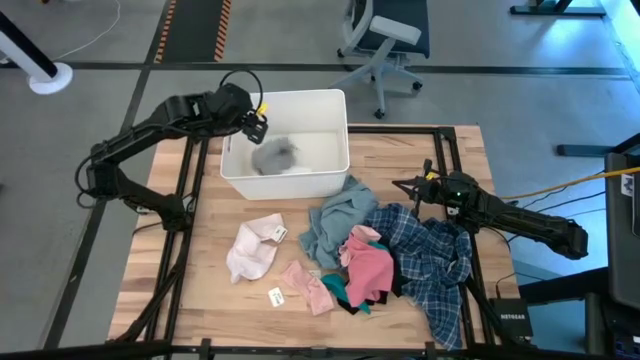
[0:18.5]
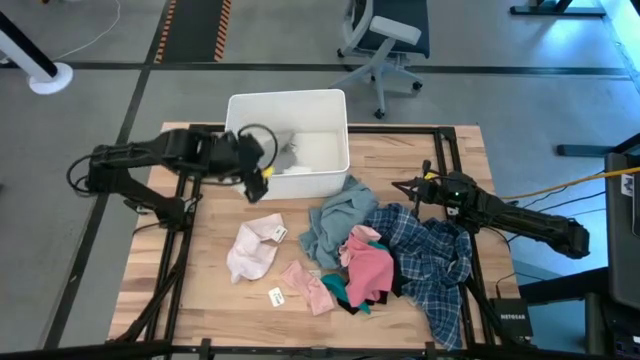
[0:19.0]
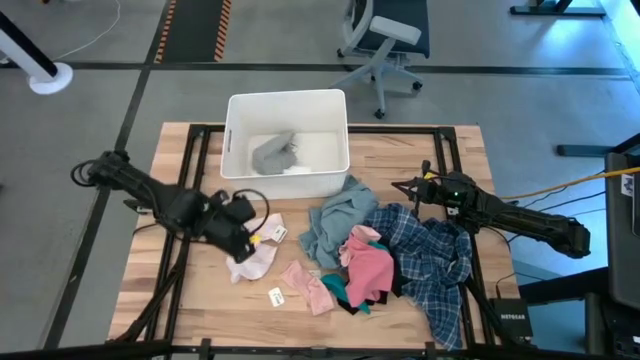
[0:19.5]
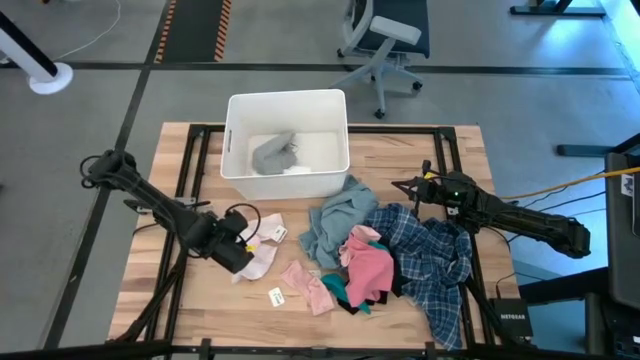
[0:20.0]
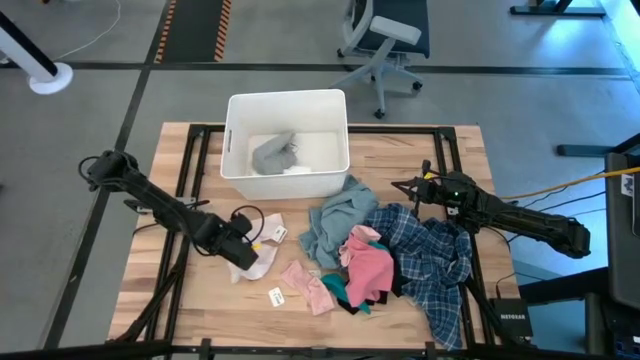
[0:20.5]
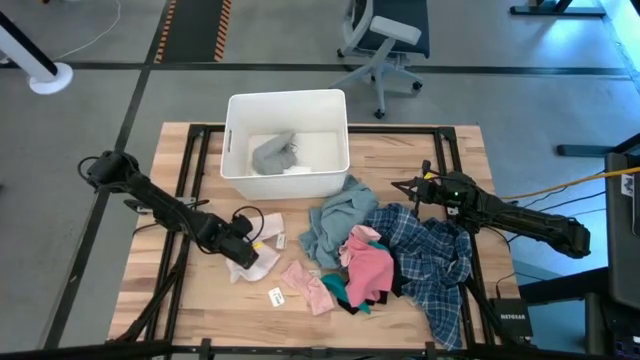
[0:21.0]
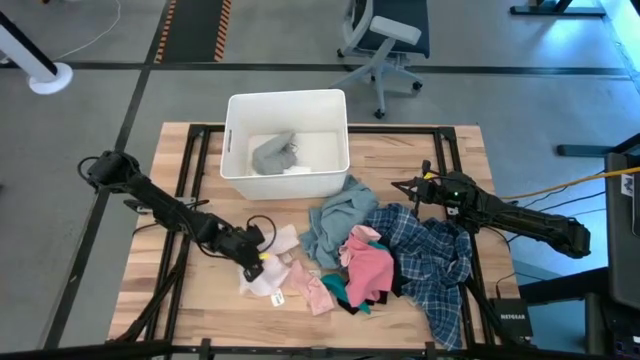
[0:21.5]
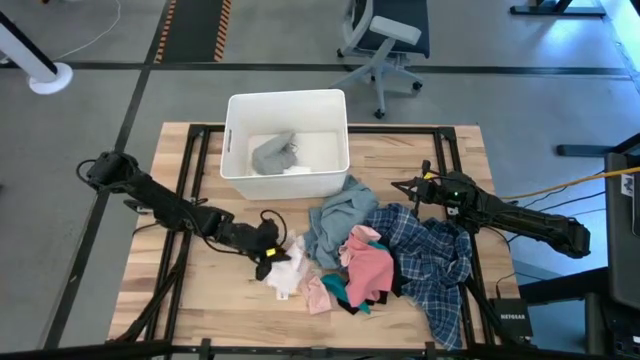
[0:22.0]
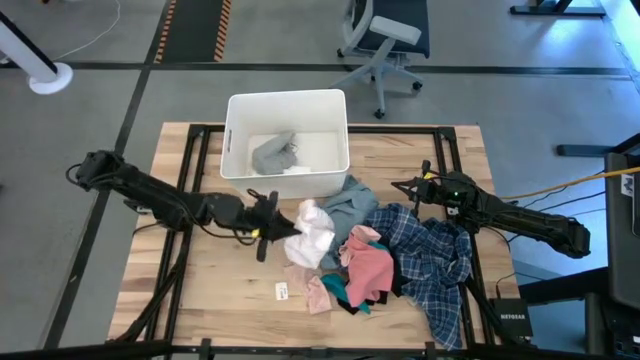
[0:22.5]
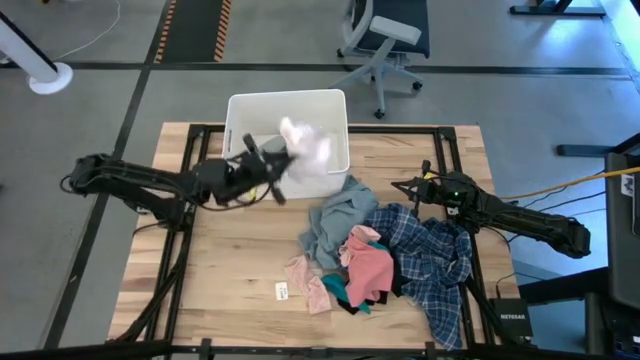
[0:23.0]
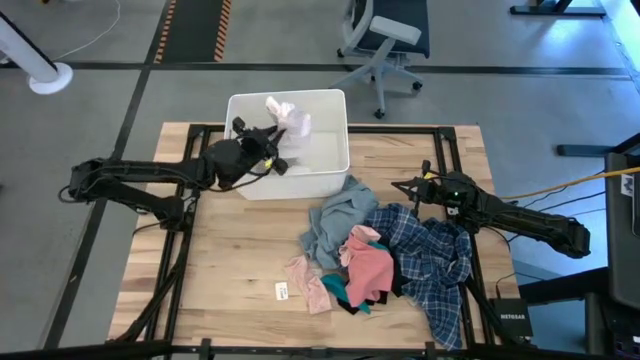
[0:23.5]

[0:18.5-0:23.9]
Task: Sort clothes
Put the light pink underwear into the white bin

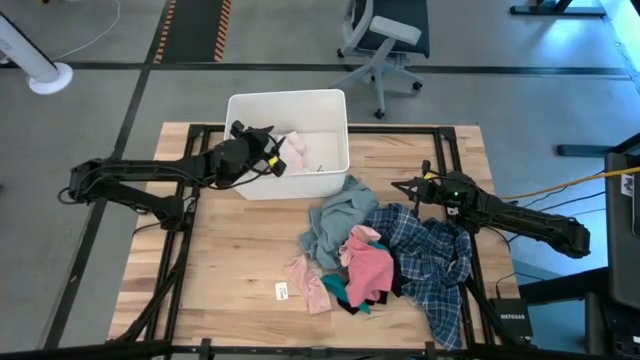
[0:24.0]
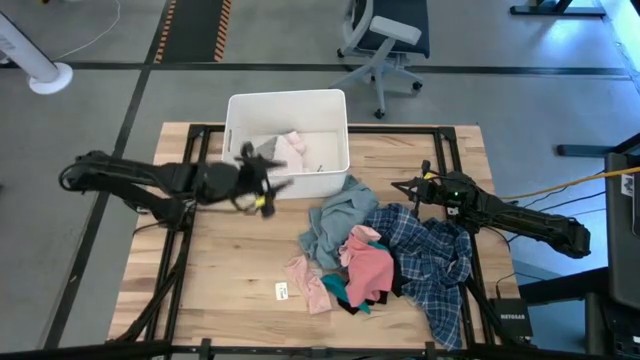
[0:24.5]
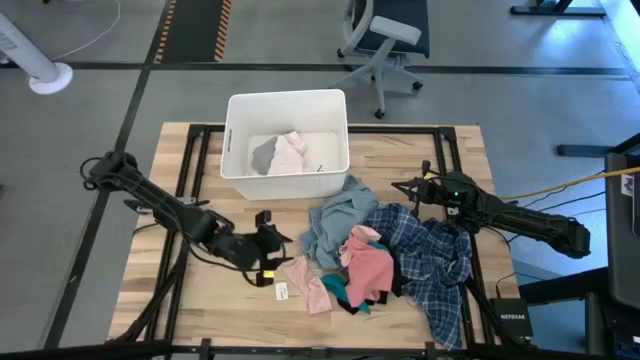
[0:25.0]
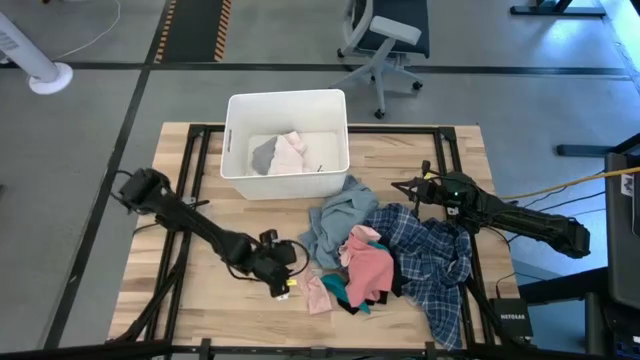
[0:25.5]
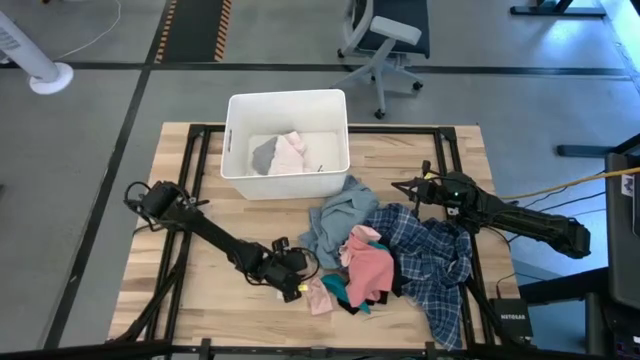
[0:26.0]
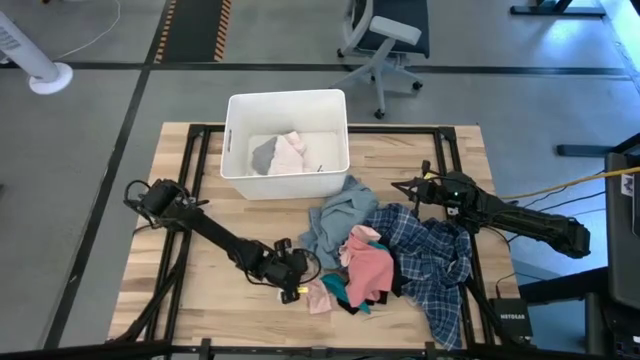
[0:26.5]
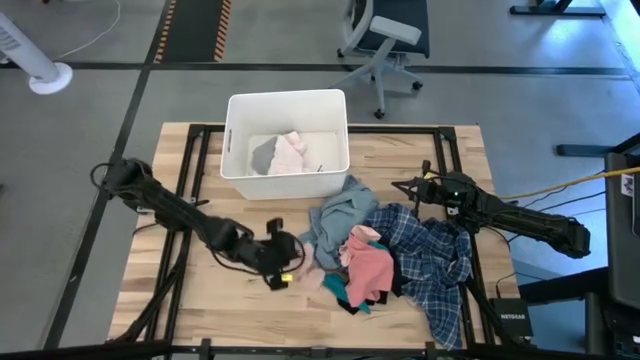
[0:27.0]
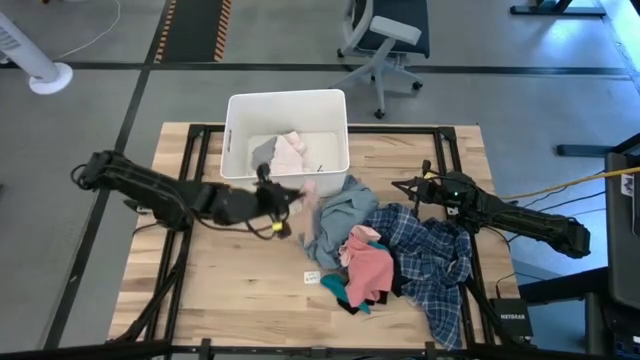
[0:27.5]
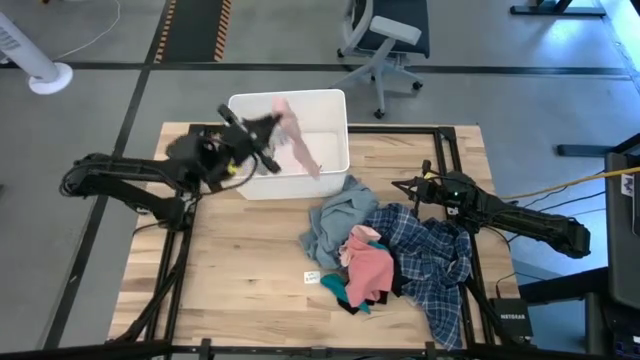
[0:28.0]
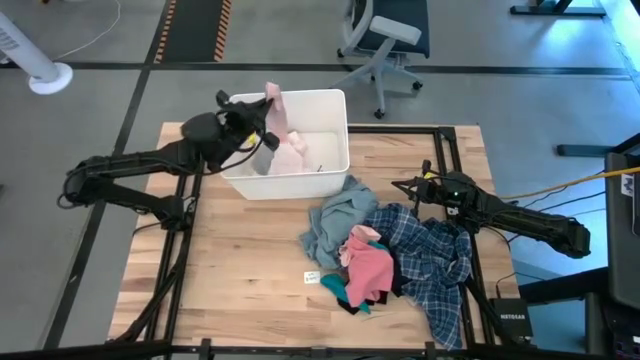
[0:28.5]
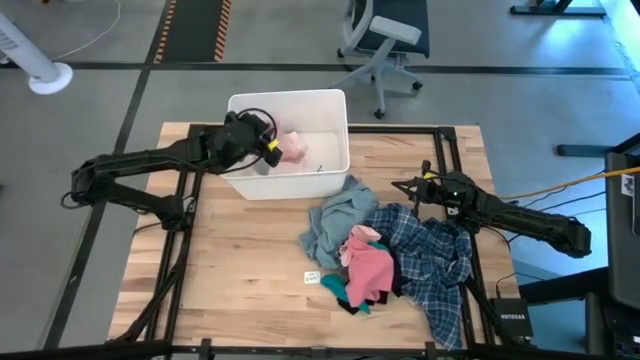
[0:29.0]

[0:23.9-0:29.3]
Put the left pink sock into the white bin

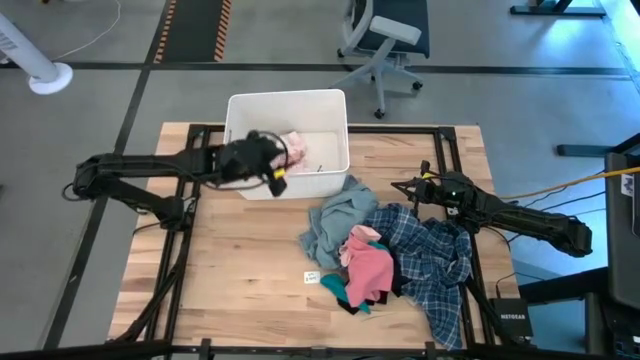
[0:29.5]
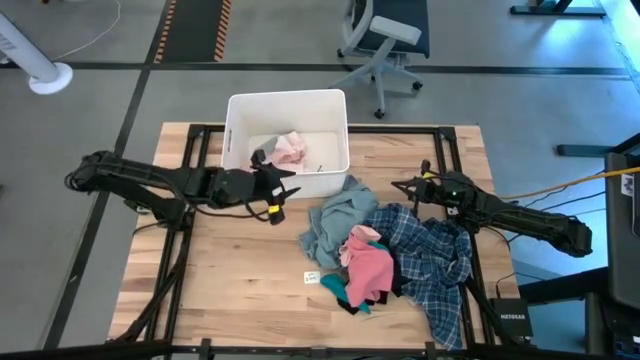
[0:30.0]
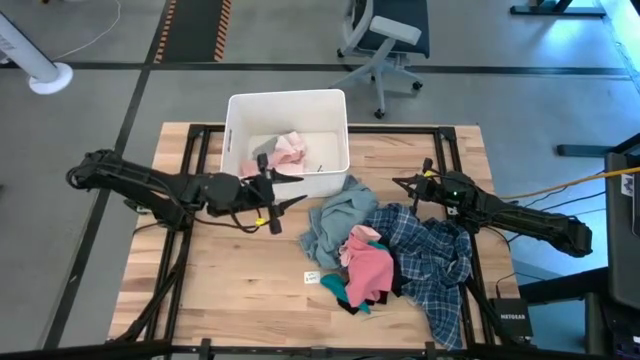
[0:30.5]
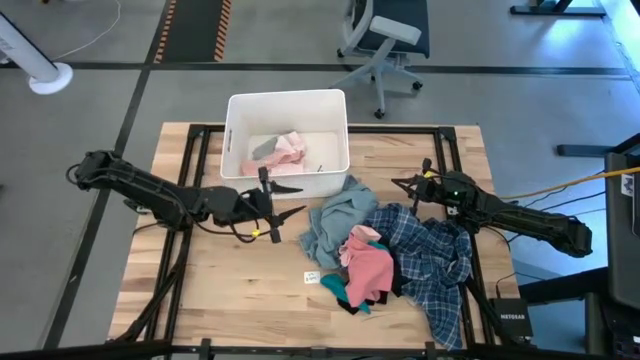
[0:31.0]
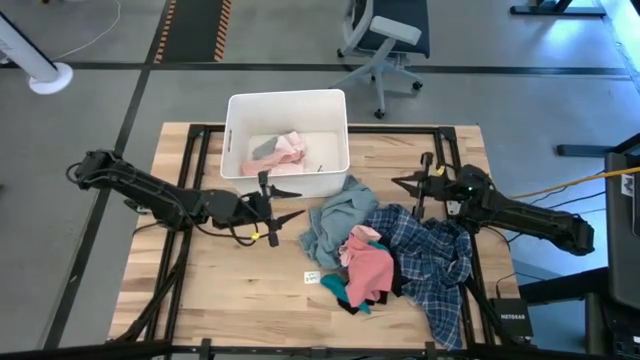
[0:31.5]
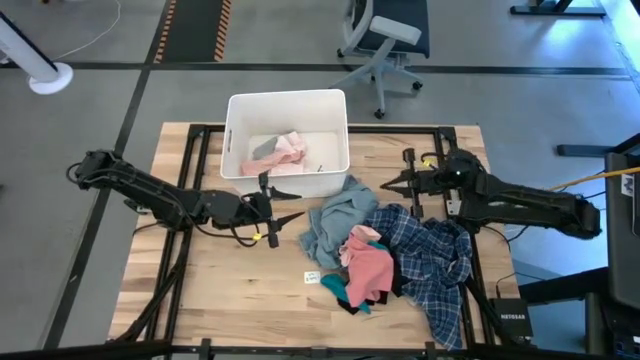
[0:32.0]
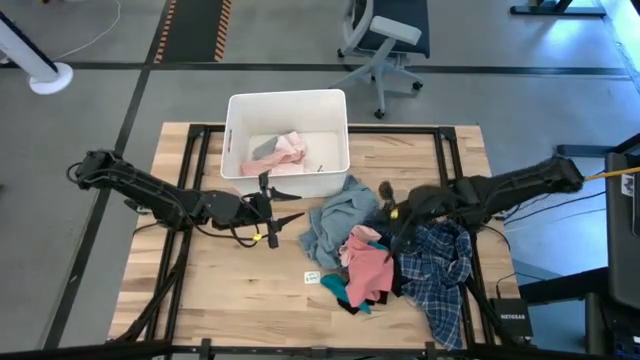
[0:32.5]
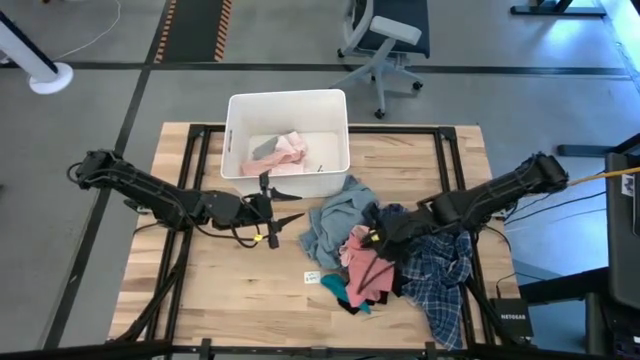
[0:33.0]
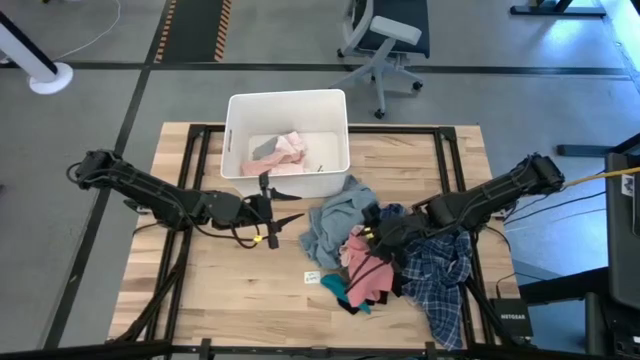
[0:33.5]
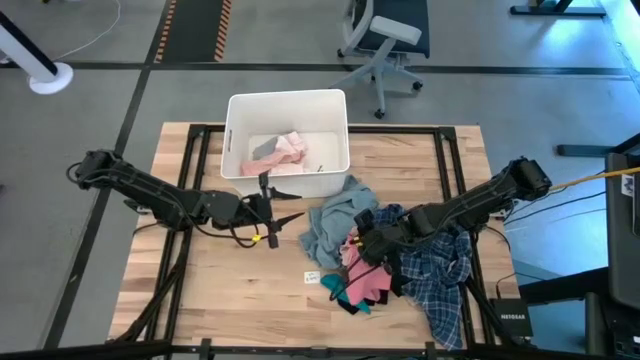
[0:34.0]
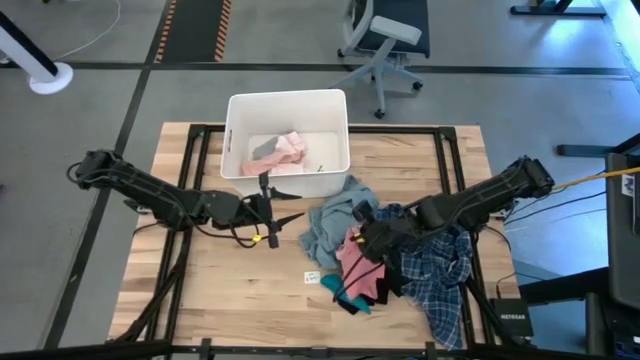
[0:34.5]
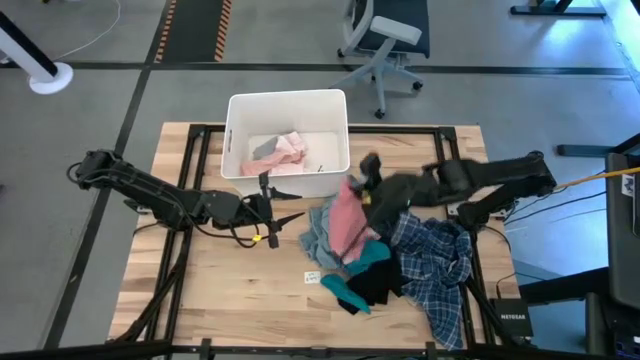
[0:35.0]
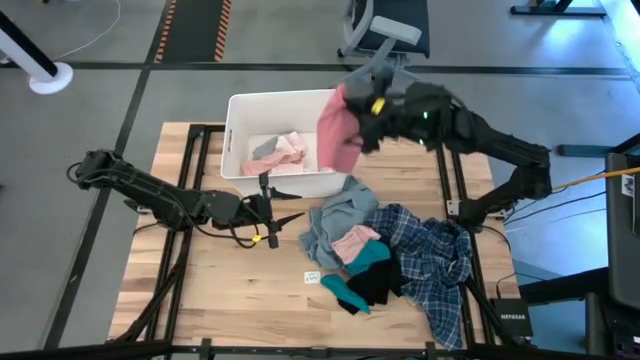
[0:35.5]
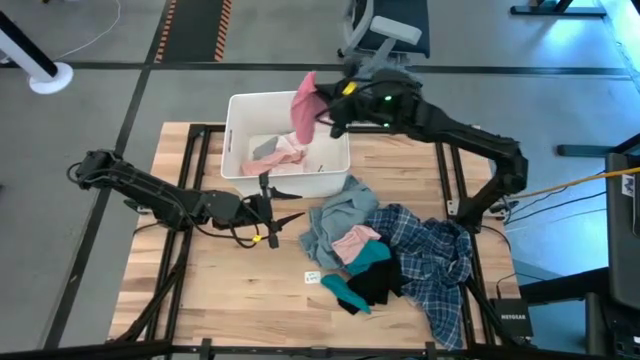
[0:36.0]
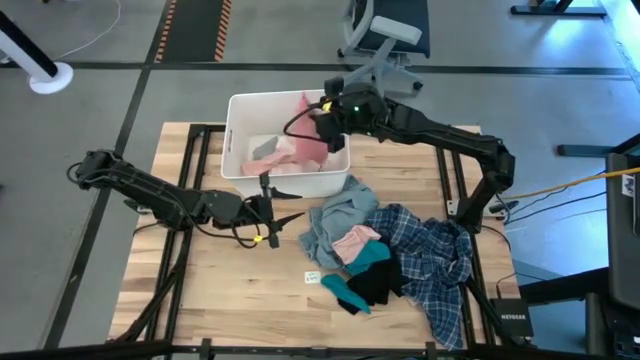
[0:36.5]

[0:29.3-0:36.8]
Put the pink underwear into the white bin

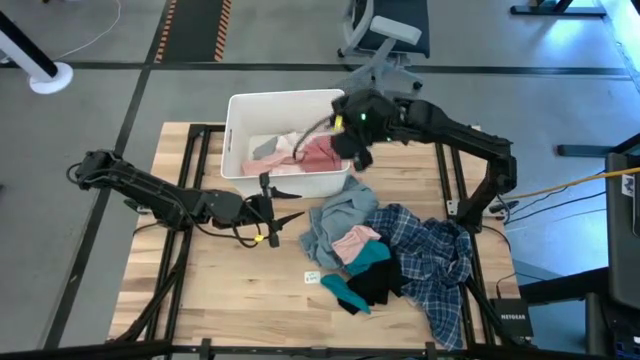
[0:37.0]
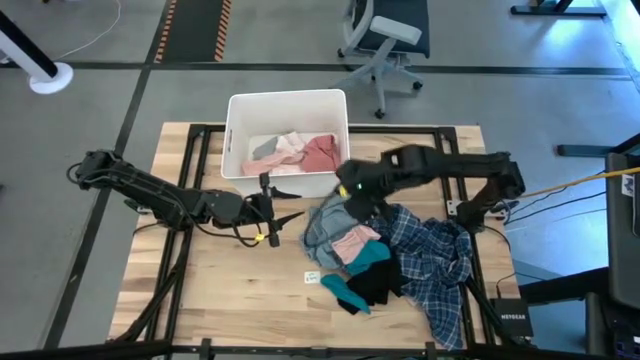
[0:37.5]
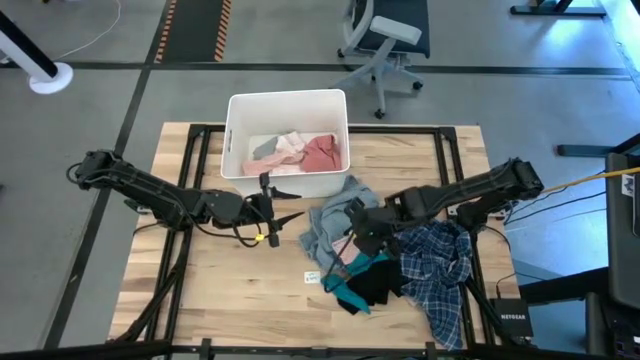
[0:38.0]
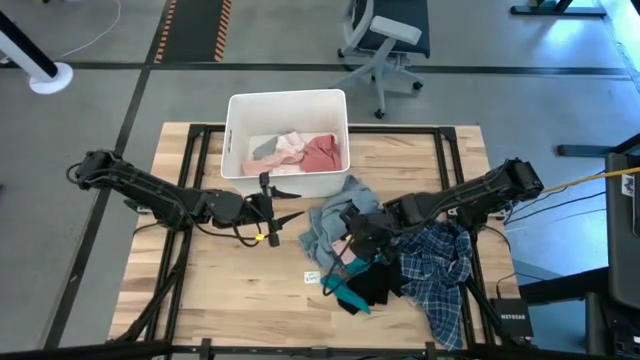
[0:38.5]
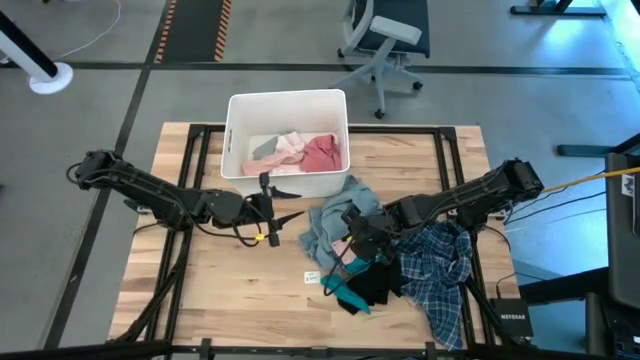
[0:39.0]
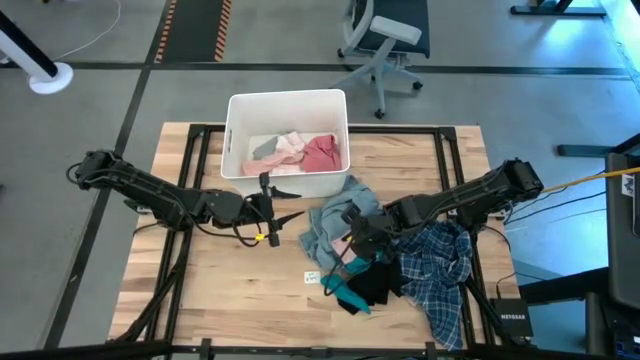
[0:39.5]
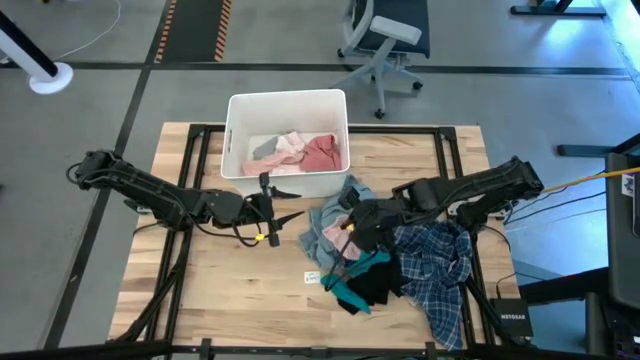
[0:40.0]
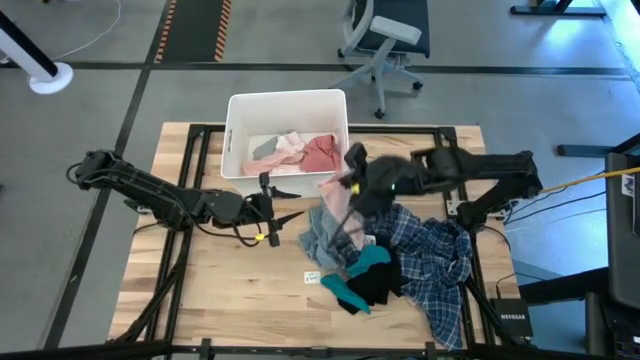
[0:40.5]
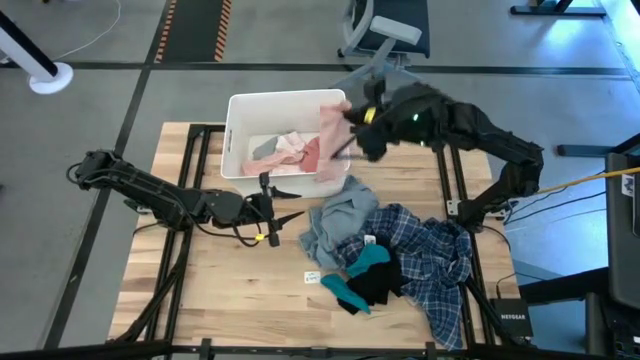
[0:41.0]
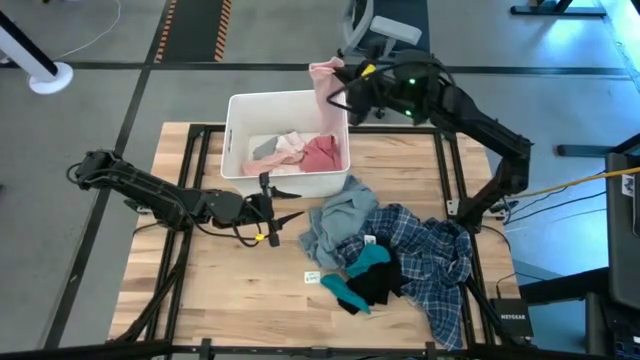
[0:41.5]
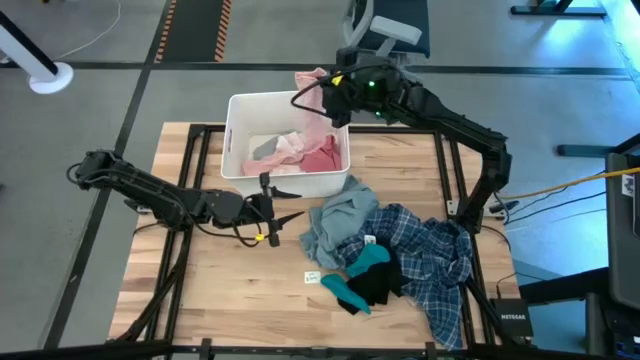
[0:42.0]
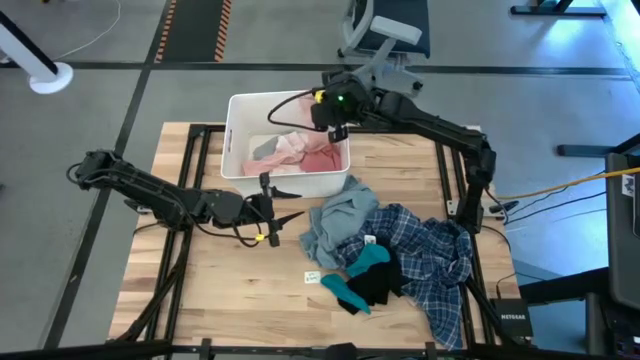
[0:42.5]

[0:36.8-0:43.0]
Put the pink sock into the white bin
